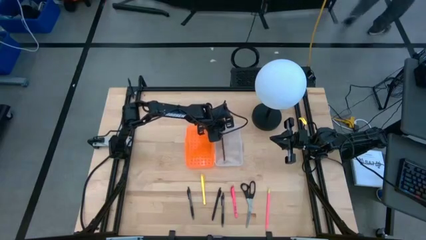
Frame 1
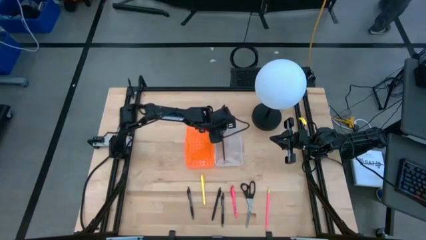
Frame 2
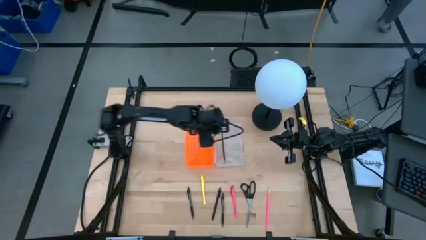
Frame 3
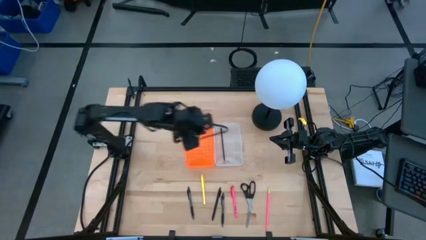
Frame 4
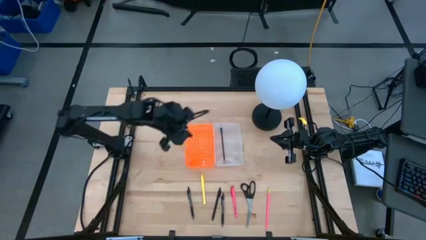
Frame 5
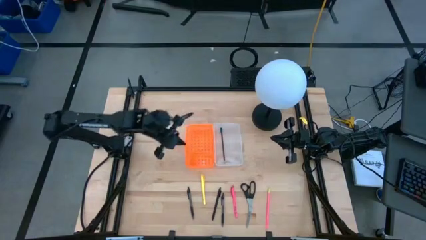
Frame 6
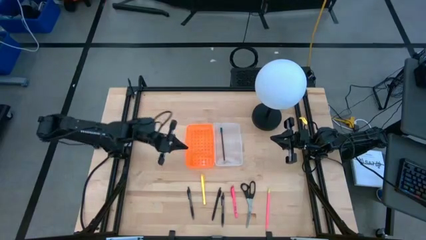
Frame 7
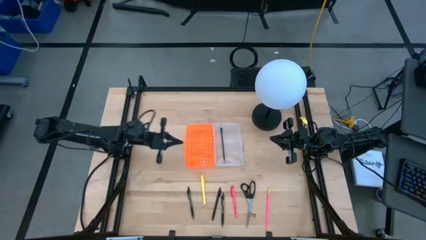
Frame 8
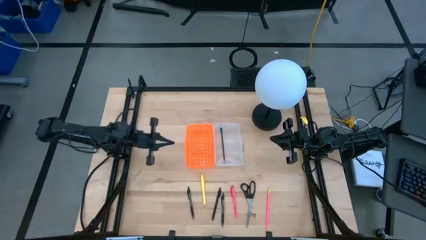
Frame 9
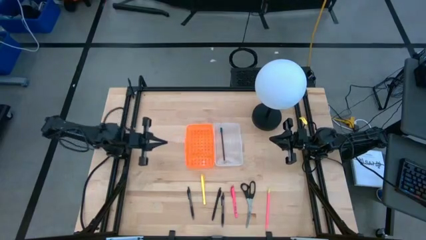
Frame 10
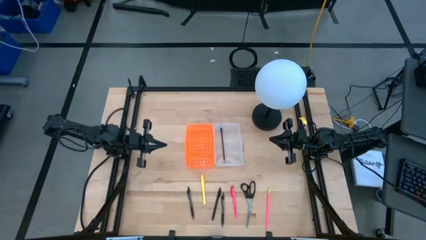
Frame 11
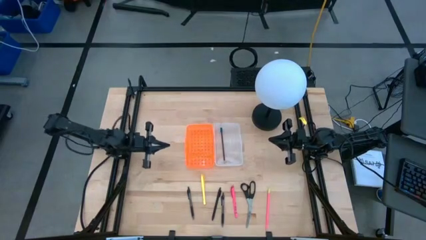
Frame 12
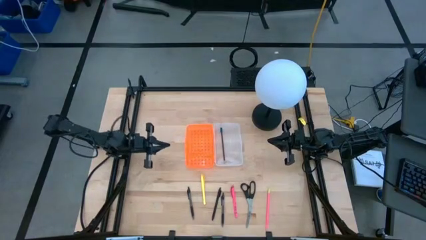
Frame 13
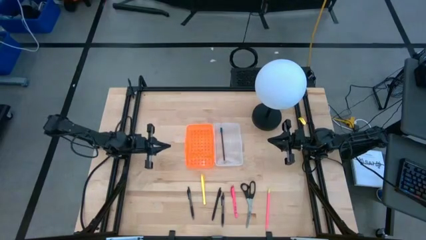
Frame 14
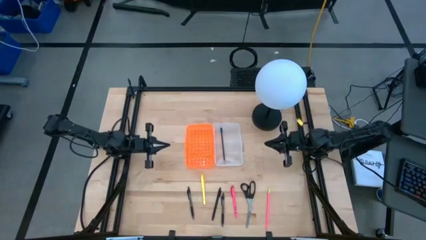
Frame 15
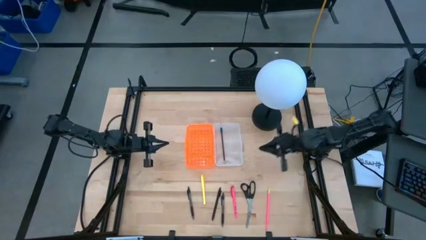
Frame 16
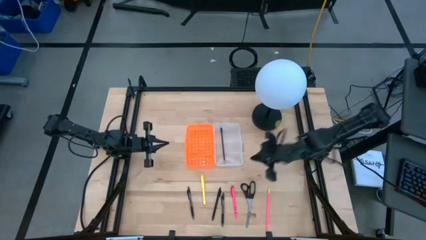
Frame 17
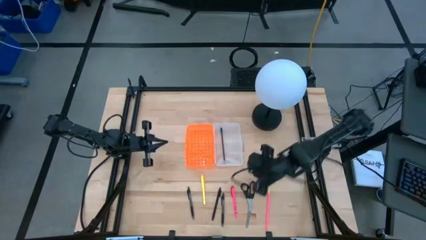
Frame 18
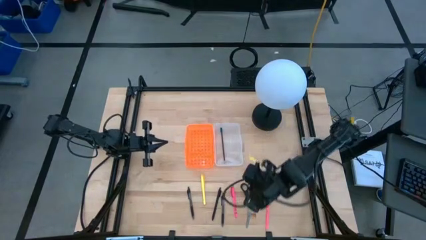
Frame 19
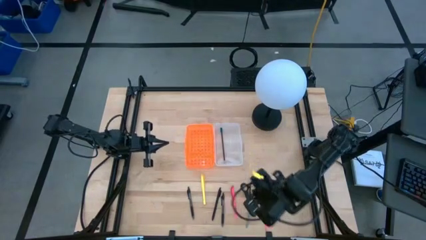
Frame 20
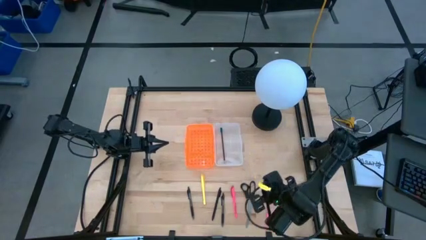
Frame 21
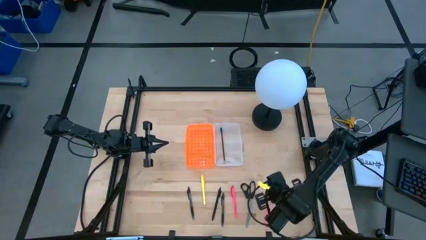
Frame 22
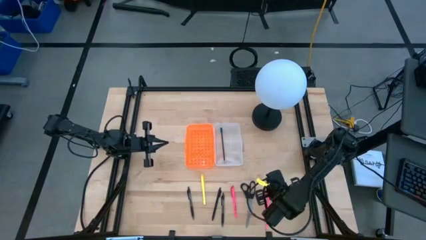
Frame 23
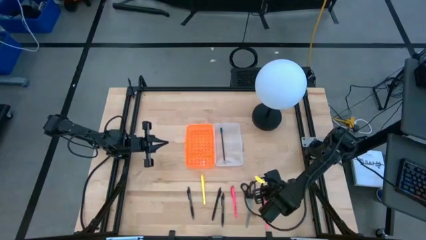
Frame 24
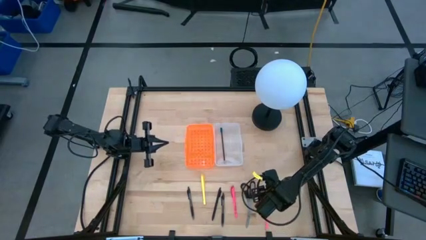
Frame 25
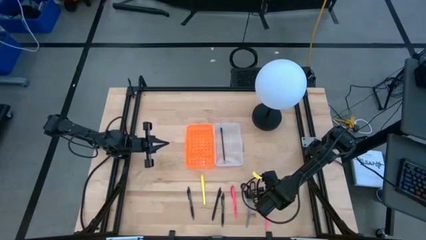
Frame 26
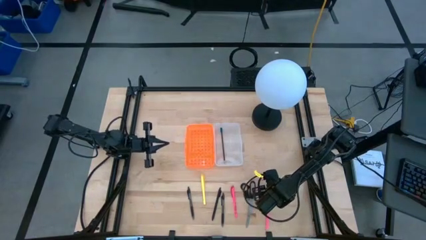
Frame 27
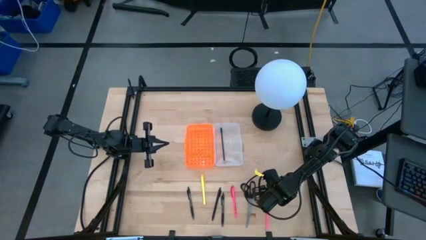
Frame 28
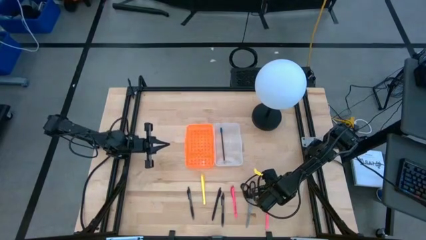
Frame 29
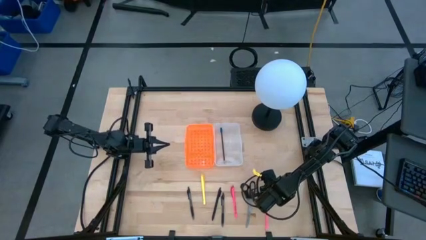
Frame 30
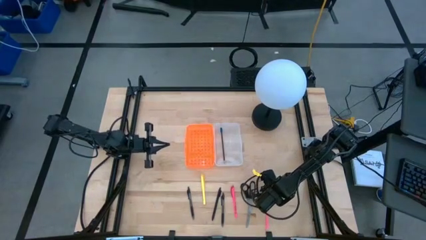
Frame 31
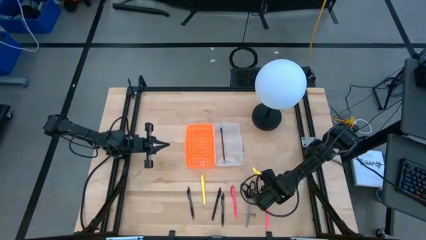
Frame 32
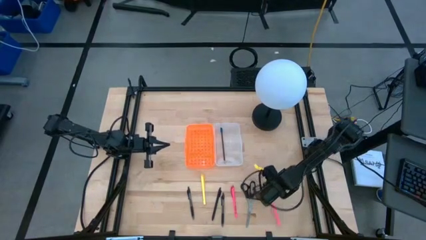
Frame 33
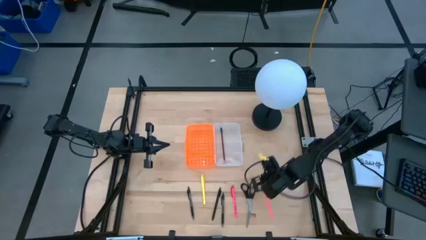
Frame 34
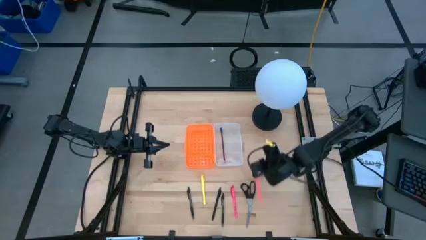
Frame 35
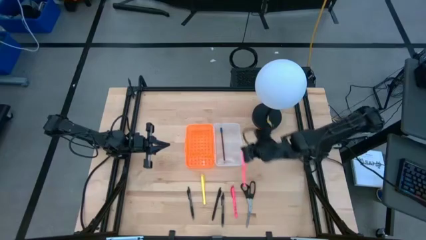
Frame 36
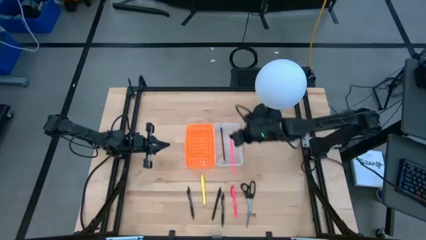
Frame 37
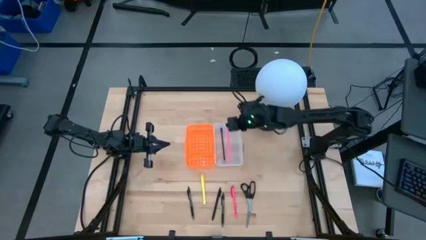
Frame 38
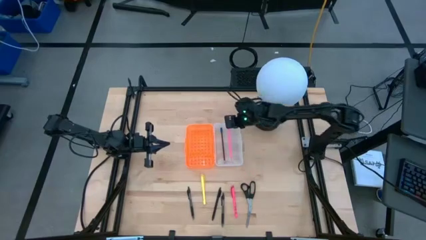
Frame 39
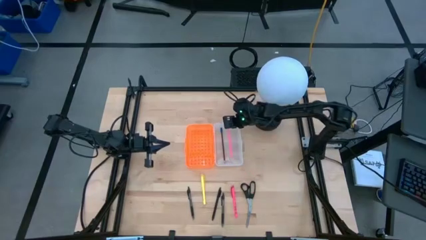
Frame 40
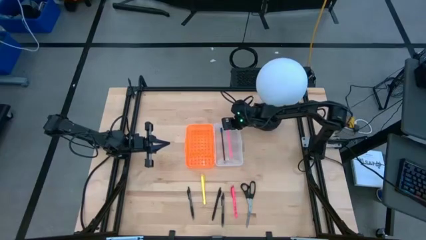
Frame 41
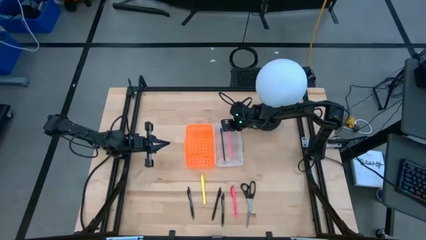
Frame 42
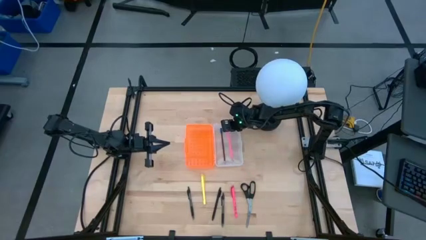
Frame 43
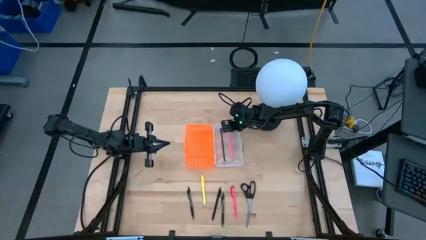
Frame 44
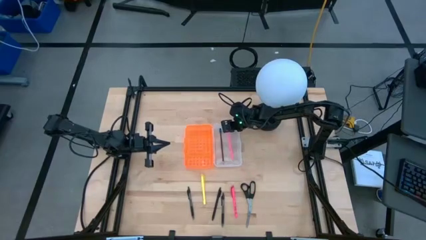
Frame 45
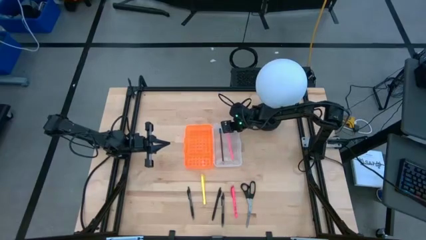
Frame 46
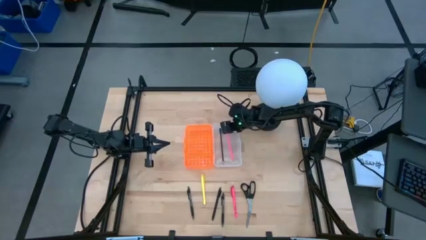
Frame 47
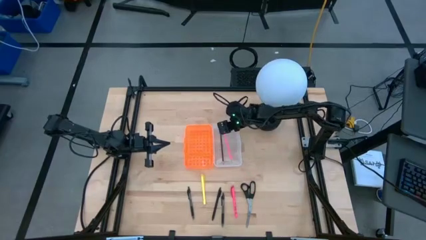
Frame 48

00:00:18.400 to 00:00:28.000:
Task: Pick & place school supplies into a supply box
Put the pink pencil into the orange supply box

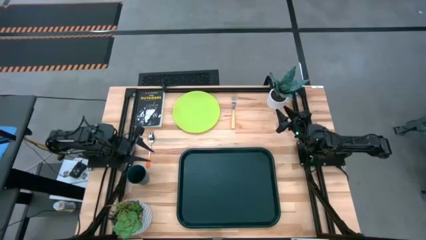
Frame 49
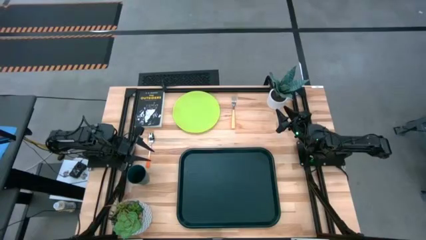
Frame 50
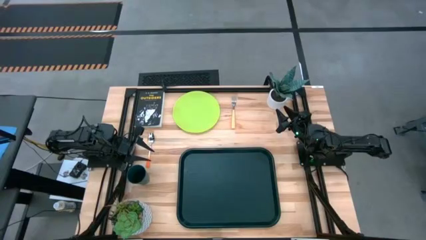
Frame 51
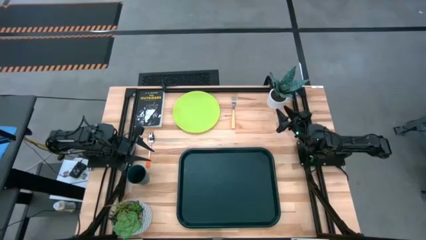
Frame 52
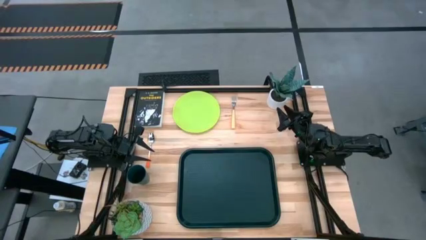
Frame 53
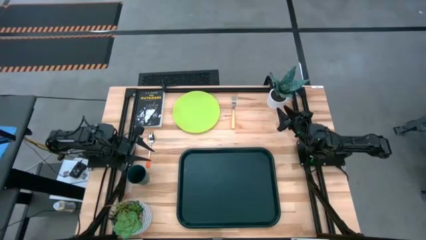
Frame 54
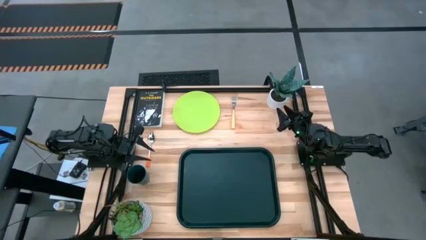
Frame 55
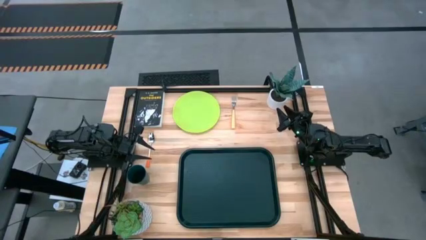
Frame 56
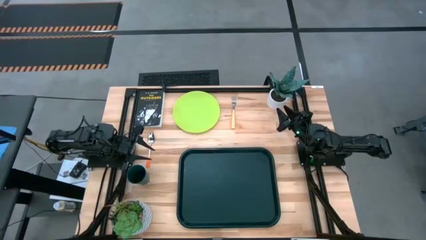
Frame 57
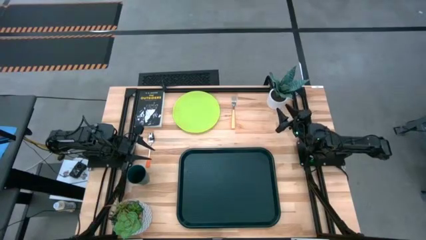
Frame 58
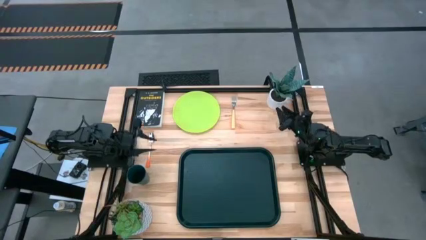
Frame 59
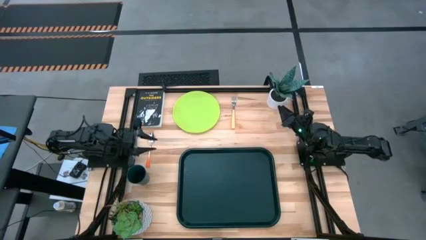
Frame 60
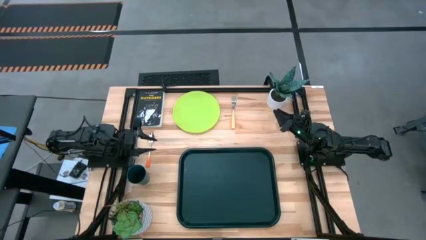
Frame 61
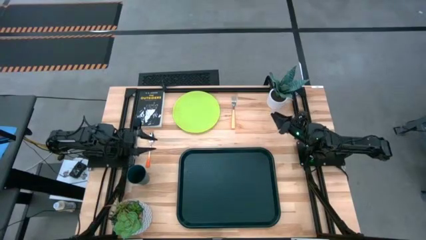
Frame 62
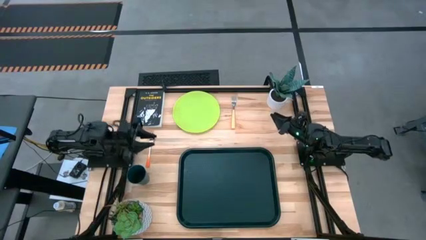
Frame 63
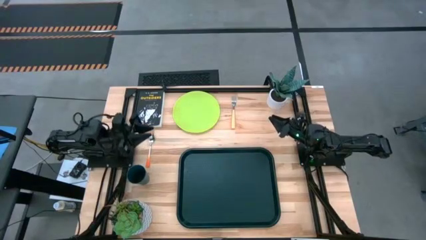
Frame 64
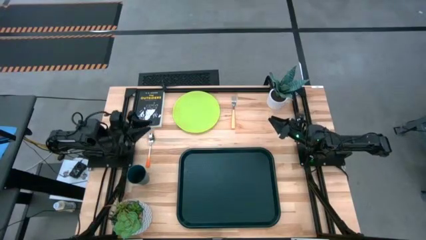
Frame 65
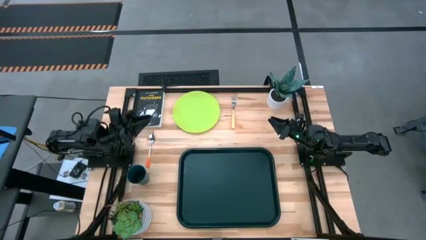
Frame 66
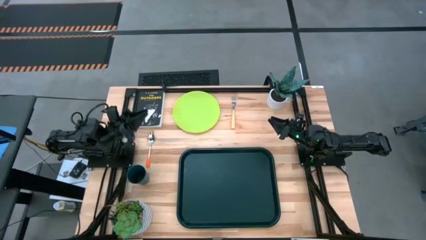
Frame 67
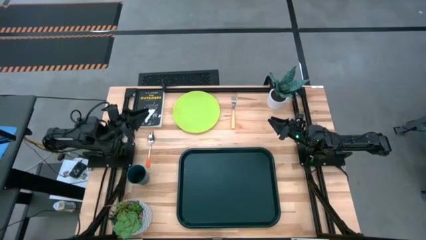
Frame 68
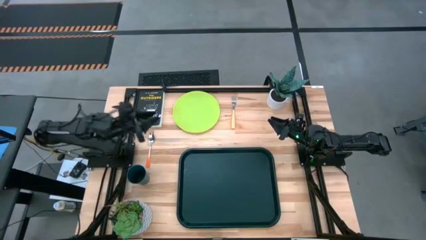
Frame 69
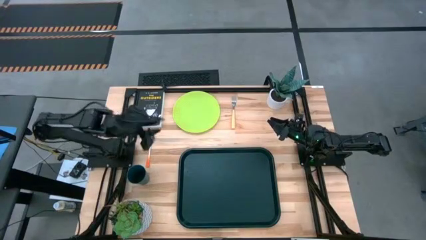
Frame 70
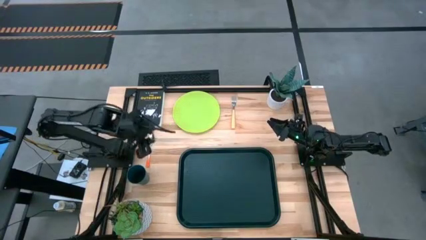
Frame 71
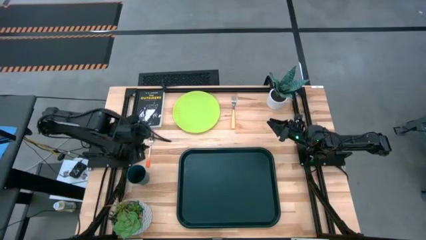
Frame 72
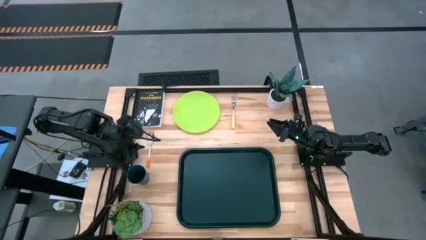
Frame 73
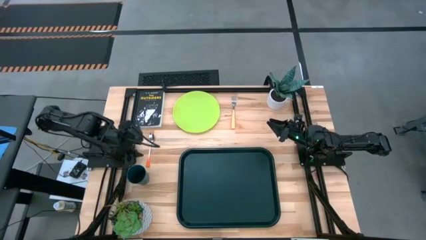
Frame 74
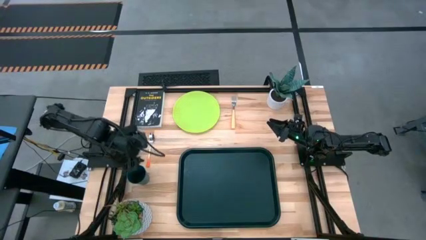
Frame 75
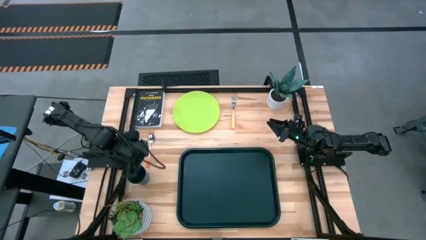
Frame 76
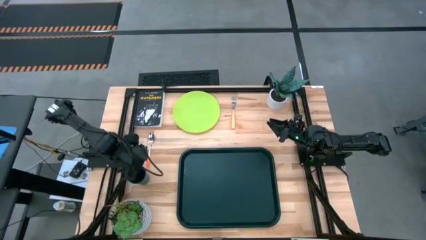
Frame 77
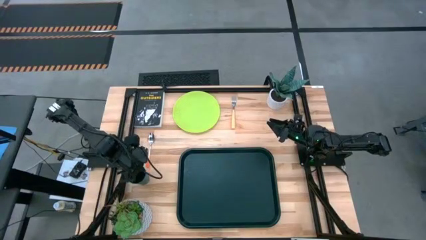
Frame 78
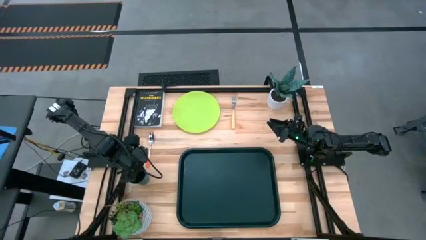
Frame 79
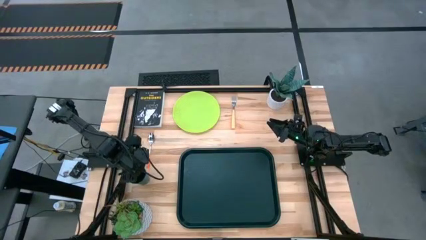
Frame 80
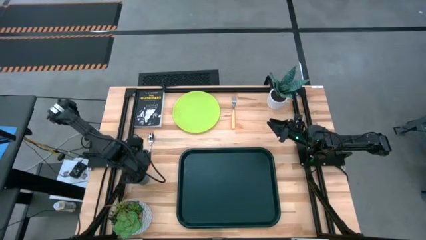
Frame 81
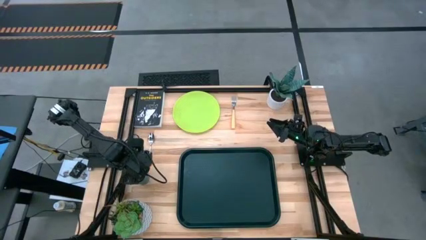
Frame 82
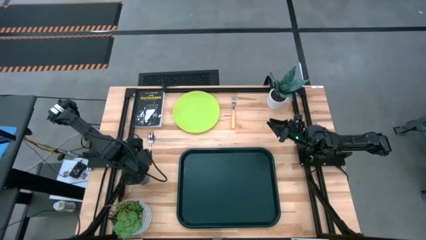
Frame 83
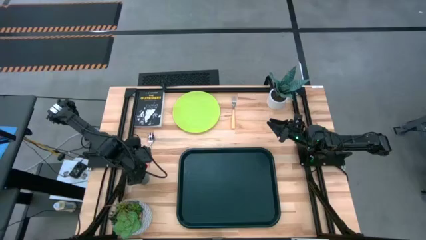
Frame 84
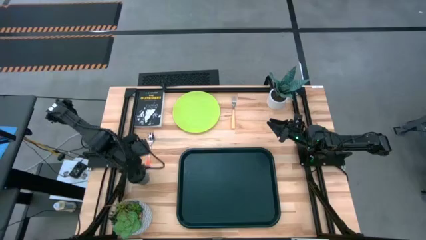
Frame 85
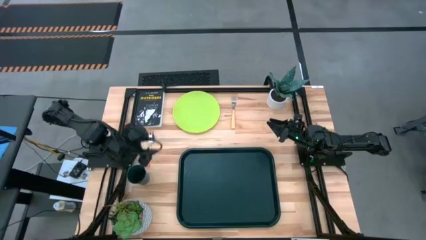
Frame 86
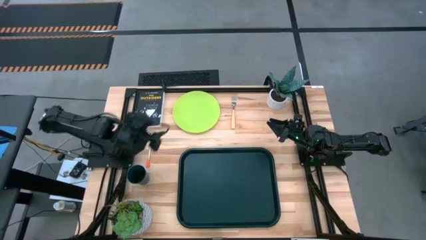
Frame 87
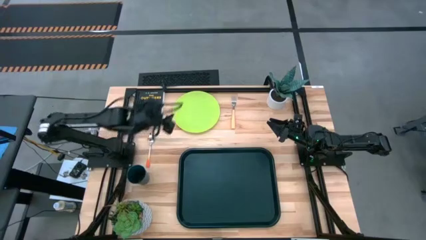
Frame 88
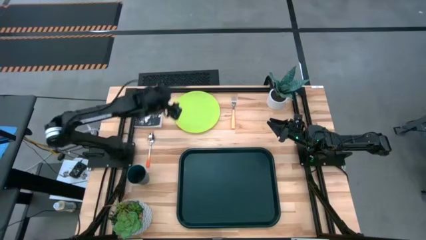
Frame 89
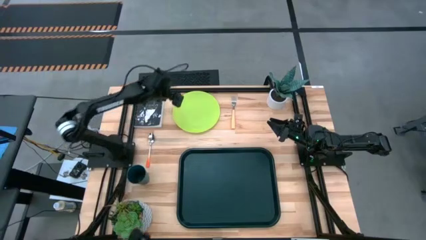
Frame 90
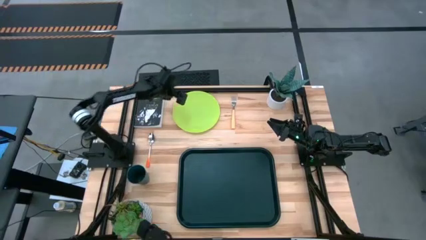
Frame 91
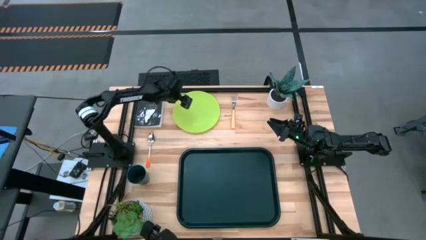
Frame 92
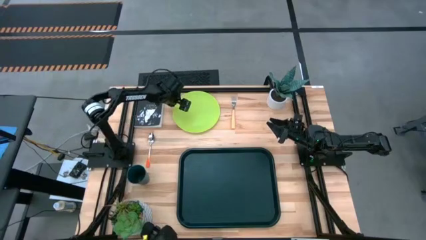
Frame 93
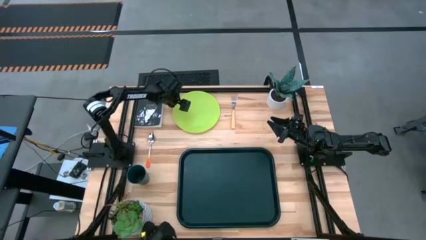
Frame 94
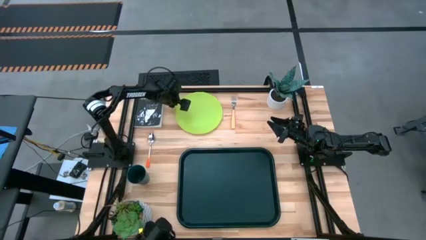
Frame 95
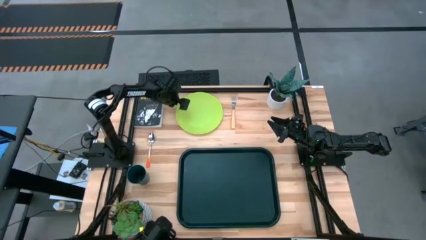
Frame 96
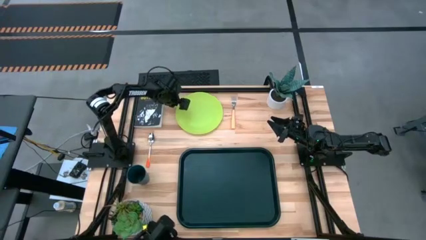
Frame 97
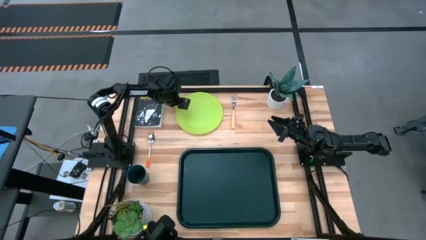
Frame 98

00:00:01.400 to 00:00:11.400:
Task: Pick and place plate/cup/fork/spoon on tray
Put the light green plate on the bottom right of the black serving tray
